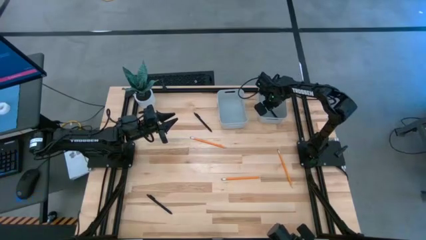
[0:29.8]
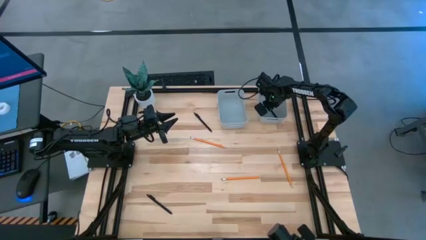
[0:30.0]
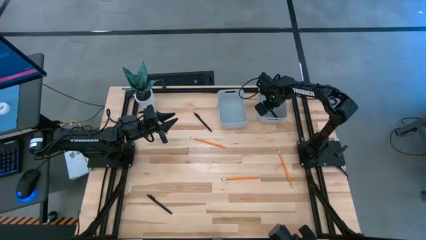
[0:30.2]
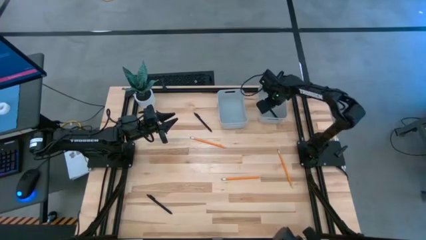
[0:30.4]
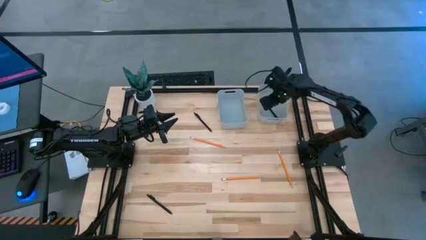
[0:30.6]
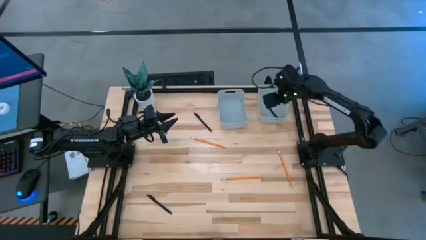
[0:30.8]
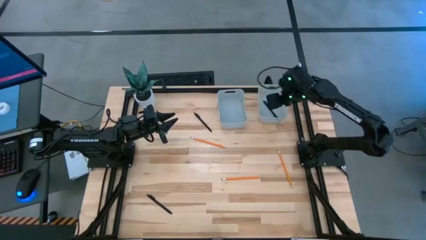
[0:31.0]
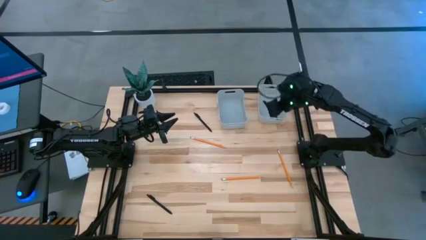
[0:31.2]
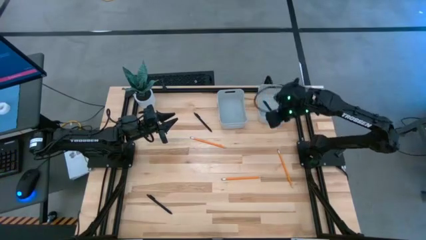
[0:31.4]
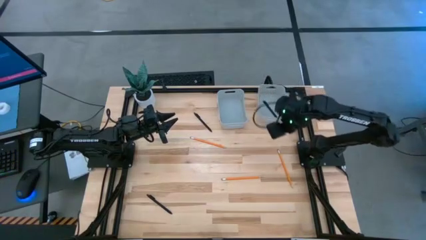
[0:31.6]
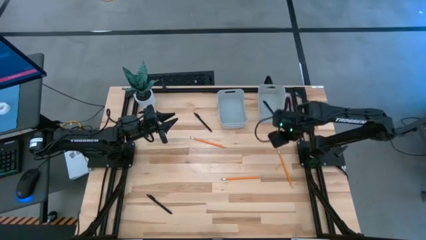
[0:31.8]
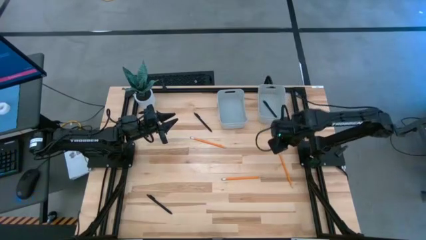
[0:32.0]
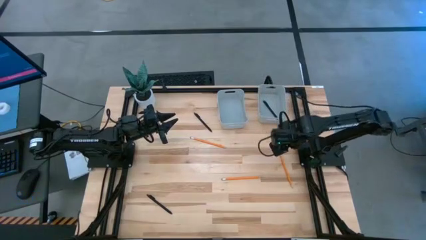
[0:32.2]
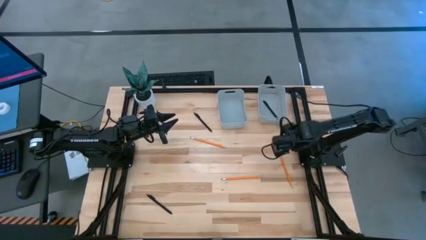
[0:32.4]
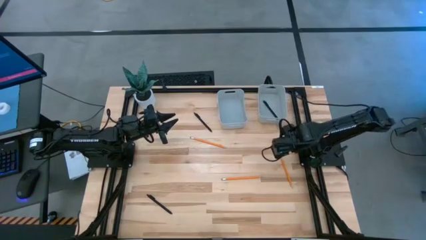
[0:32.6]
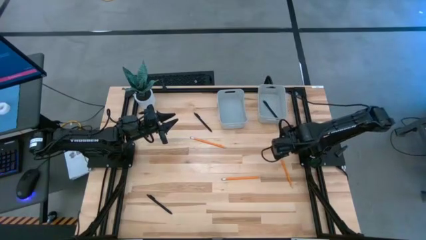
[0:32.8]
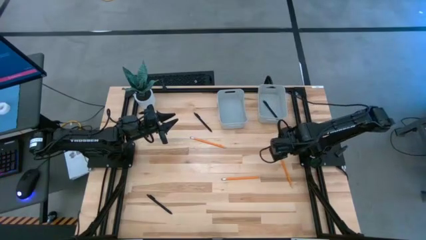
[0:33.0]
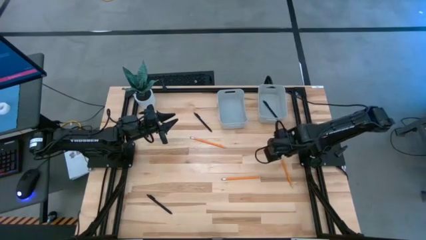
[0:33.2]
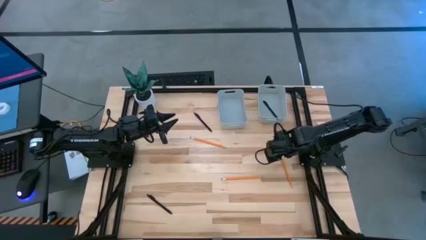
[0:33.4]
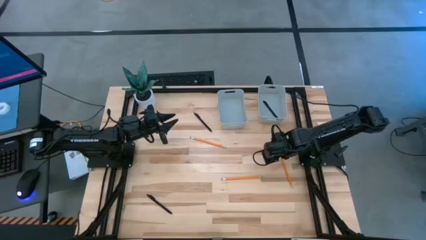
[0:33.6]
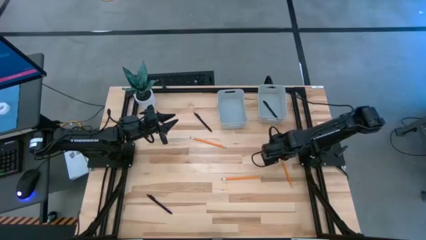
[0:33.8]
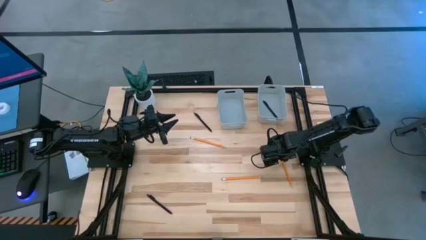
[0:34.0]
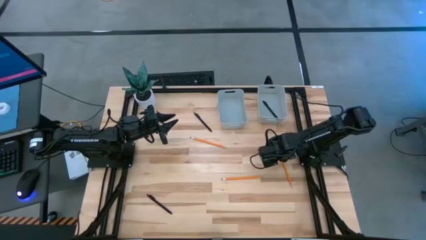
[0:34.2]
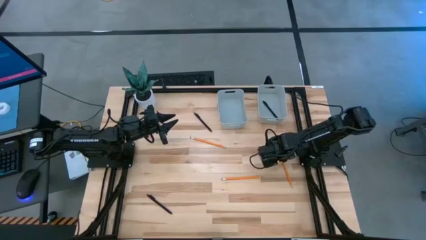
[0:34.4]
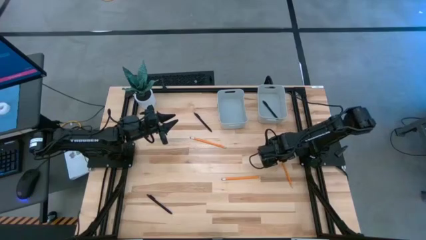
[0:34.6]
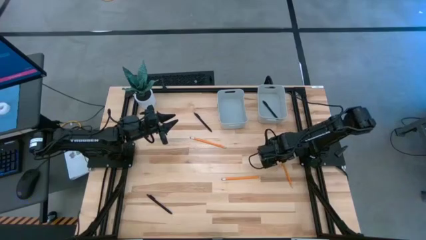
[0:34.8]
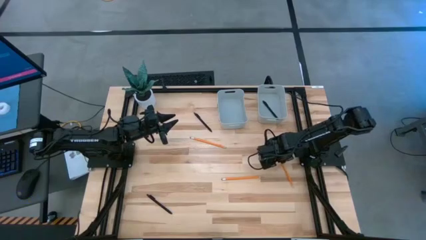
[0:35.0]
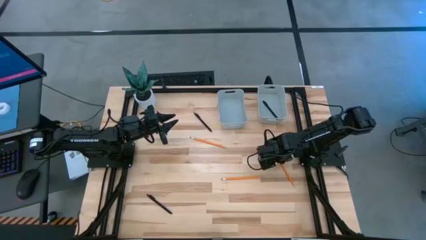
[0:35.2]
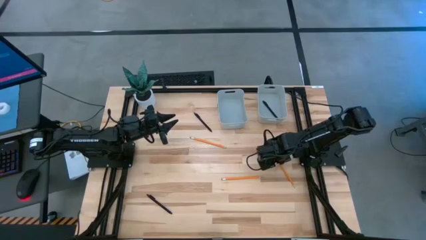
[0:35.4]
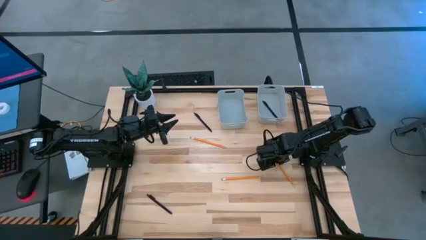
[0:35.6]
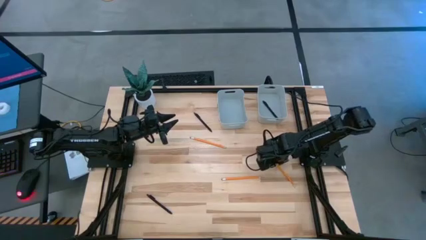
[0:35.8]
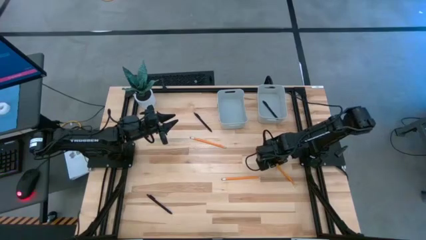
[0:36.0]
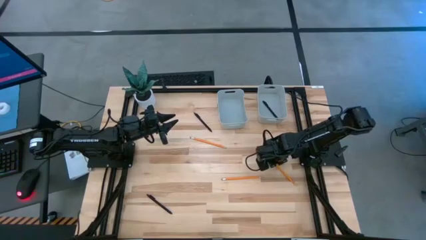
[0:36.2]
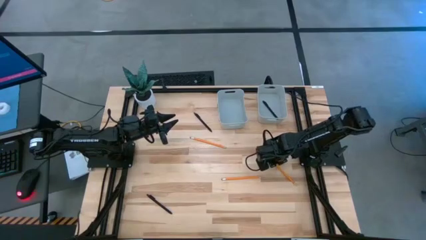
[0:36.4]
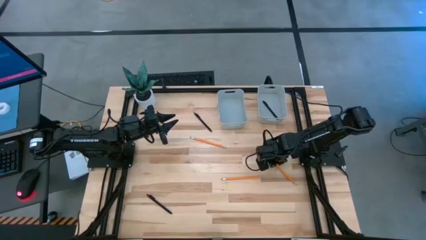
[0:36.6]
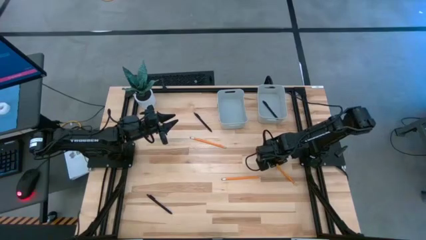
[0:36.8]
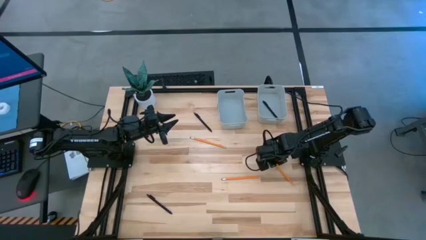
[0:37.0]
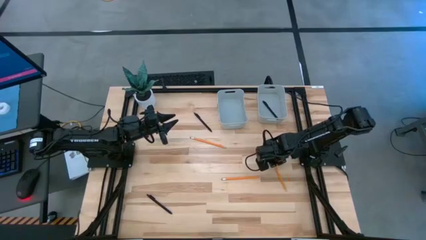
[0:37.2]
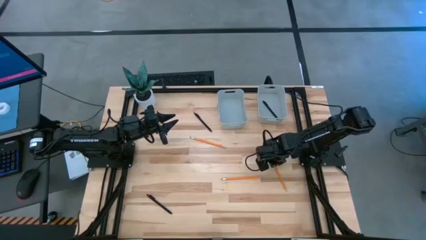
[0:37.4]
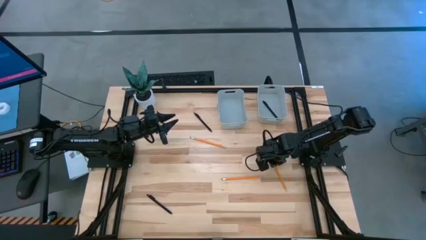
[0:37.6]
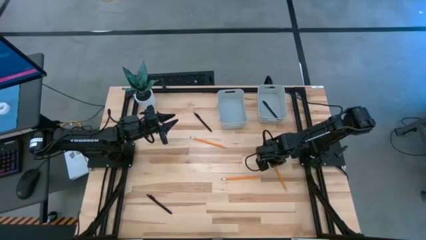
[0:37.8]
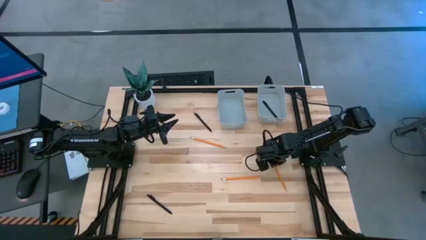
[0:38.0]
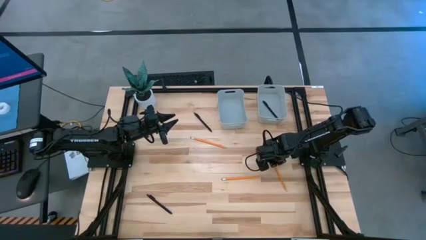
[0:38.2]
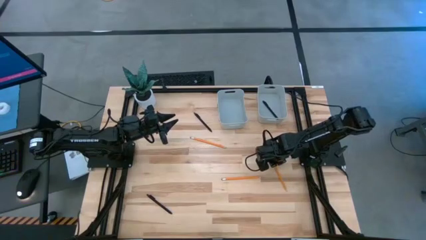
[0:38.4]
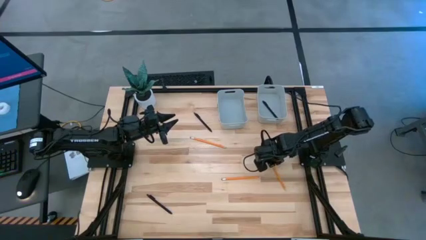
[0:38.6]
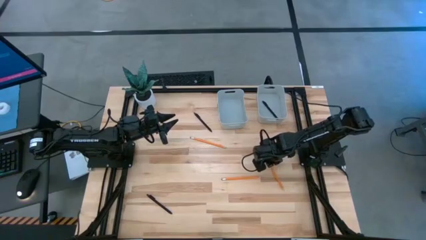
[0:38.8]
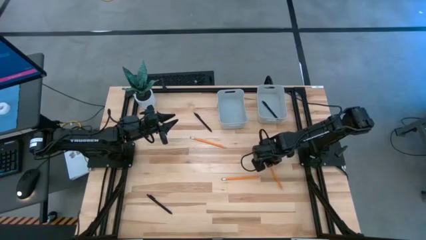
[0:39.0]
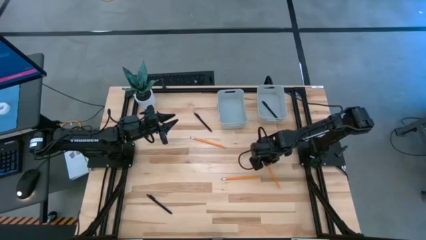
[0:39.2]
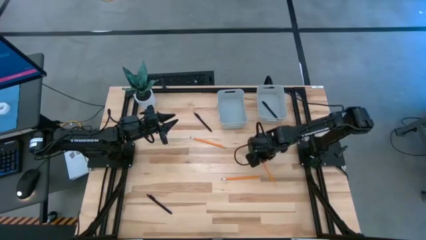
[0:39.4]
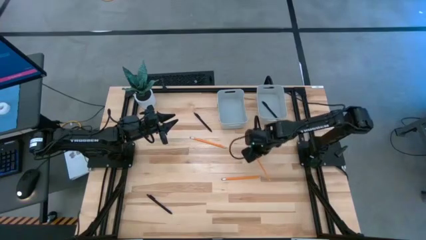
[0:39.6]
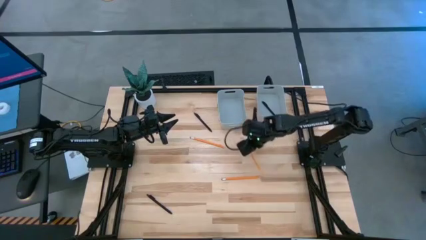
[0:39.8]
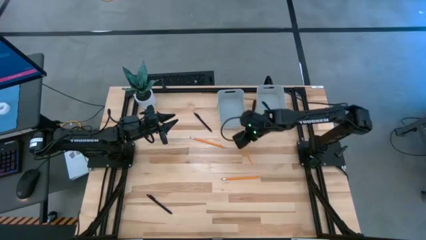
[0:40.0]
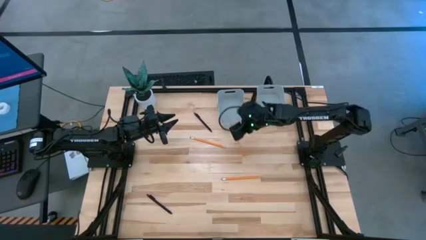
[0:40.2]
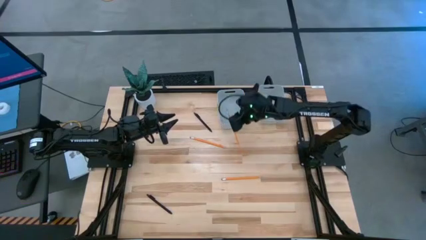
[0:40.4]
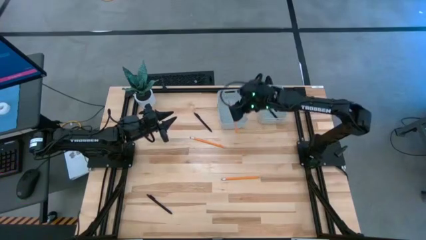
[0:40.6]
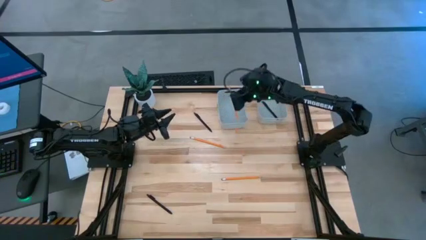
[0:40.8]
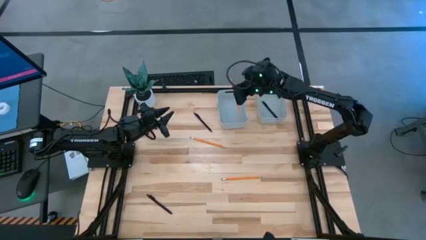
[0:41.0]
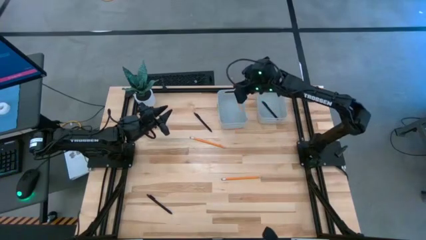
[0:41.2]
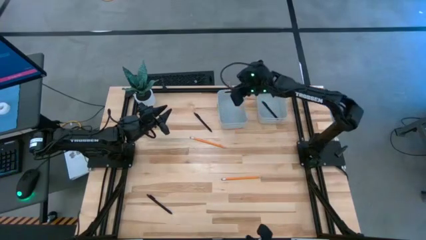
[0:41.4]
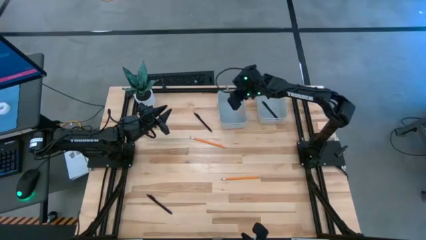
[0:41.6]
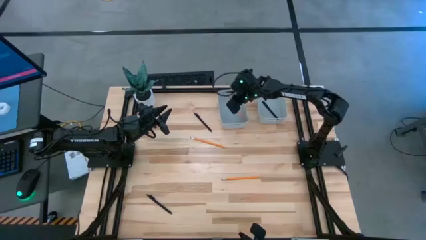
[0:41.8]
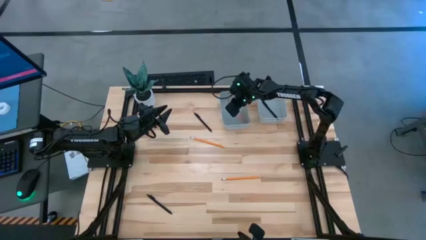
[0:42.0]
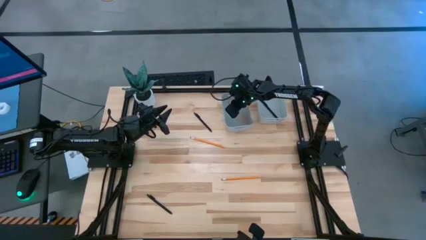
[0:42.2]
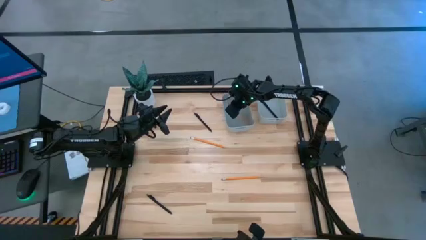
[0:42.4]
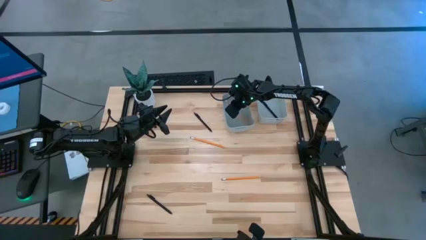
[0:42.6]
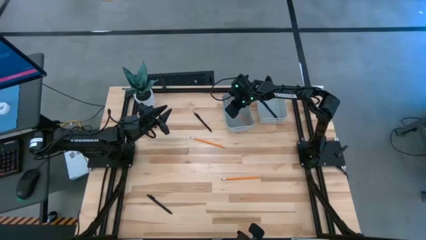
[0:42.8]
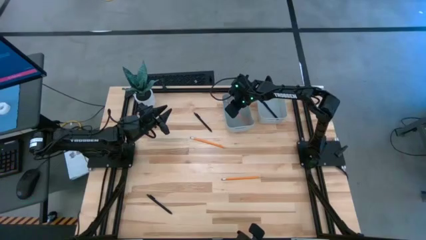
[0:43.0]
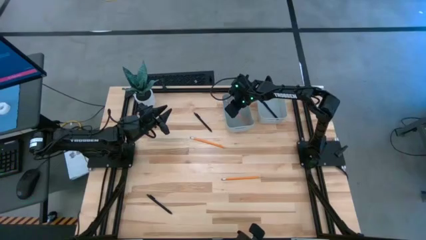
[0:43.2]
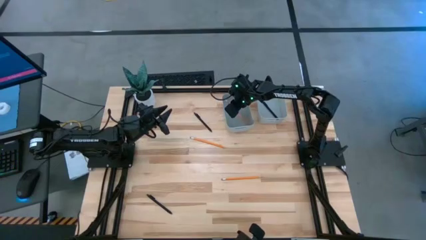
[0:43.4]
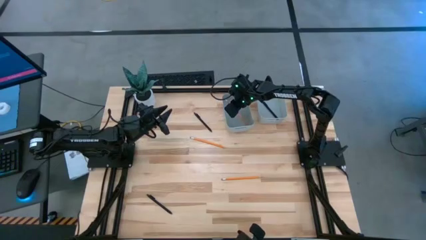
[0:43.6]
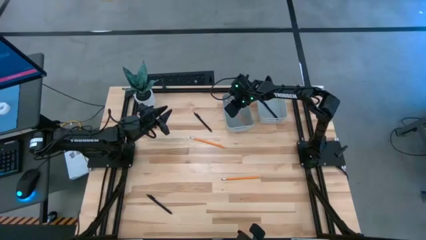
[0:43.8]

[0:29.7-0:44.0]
Task: Sort pens & pencils
Put the bottom right yellow pencil into the left gray bin

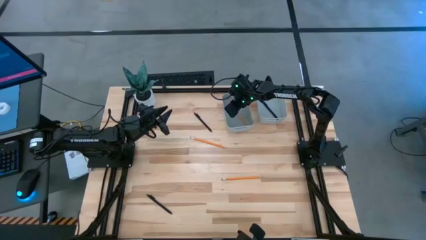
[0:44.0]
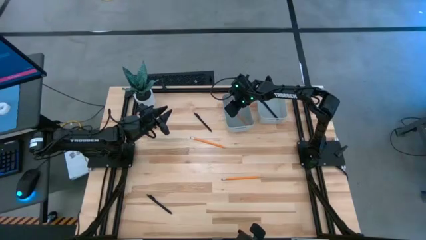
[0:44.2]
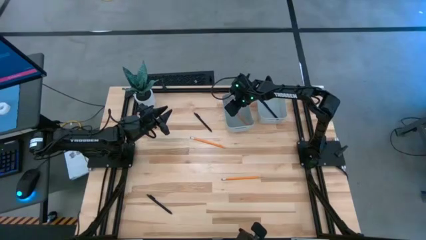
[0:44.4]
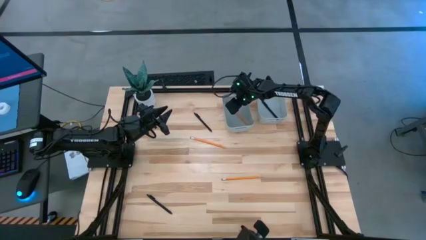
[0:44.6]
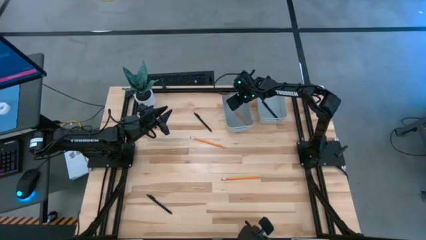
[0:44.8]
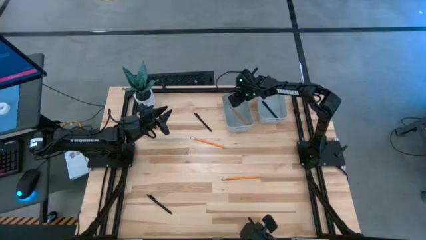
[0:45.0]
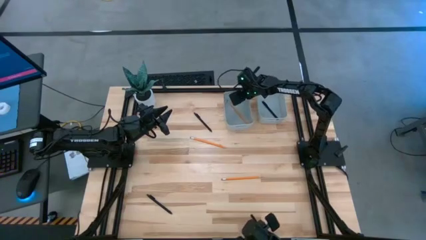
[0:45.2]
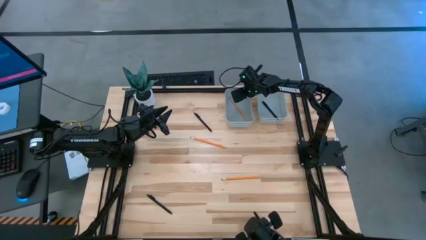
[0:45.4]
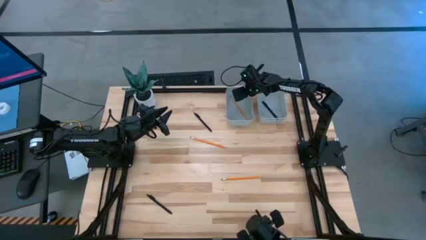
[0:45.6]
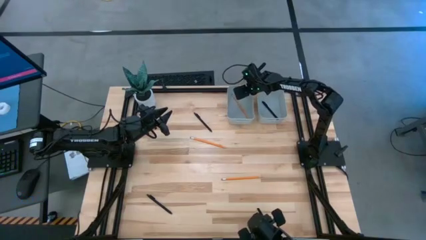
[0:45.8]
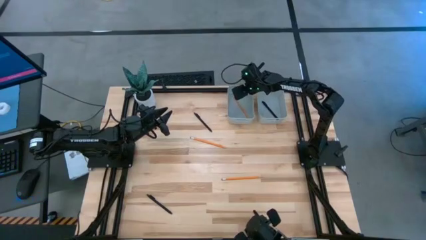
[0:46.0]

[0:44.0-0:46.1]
Adjust the left gray bin
